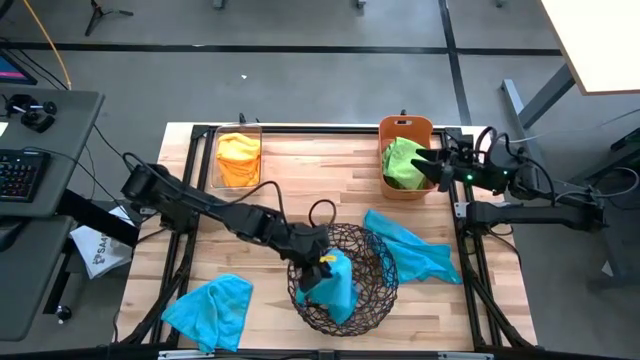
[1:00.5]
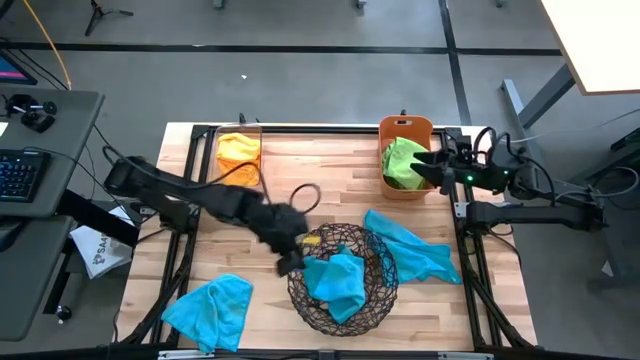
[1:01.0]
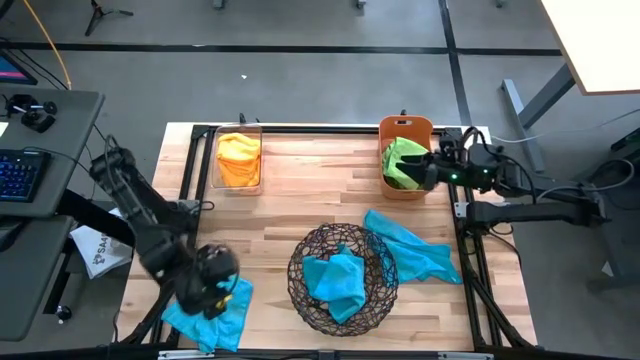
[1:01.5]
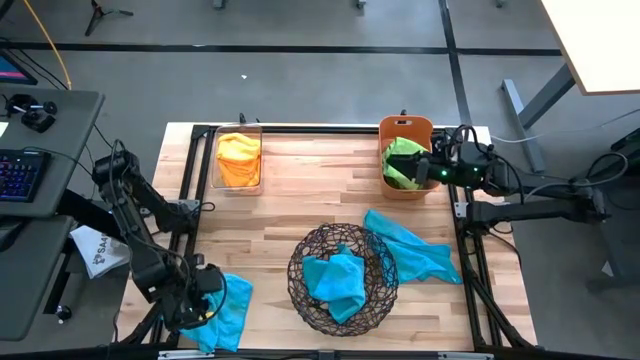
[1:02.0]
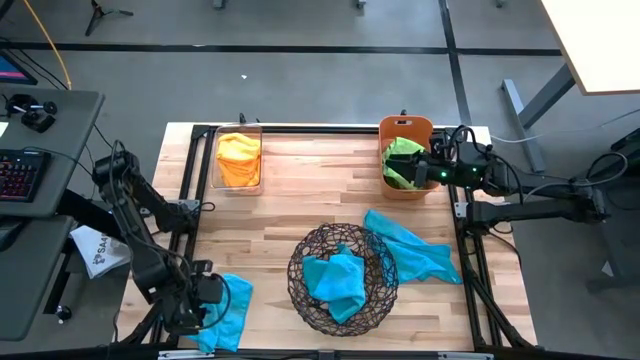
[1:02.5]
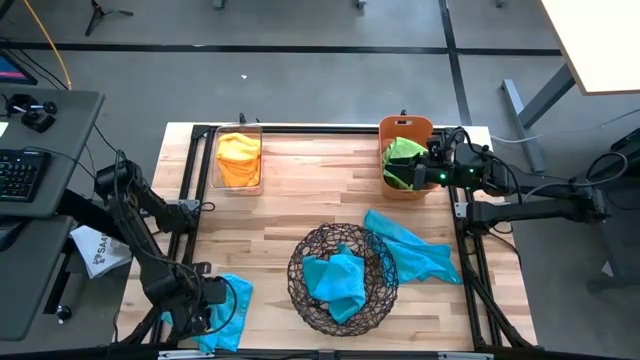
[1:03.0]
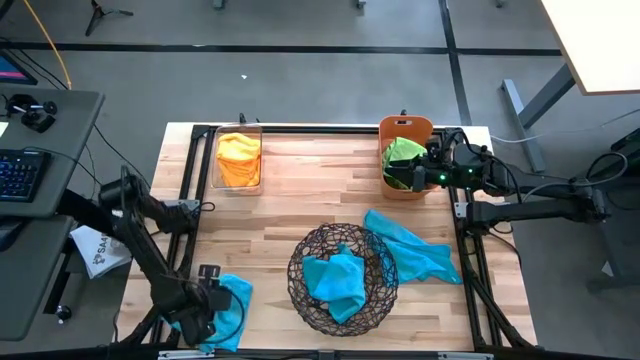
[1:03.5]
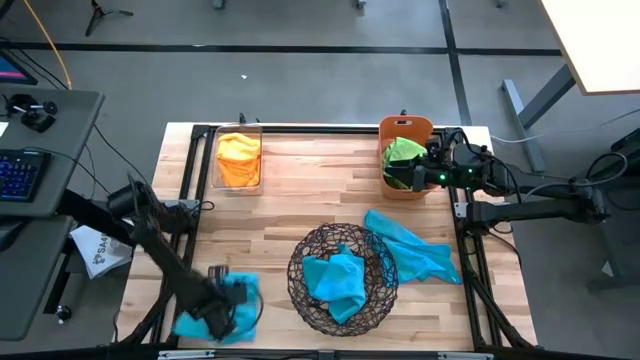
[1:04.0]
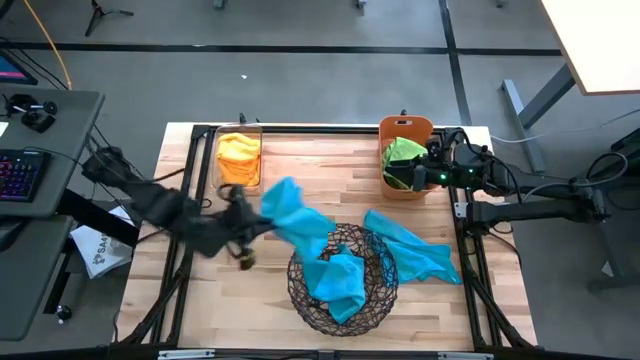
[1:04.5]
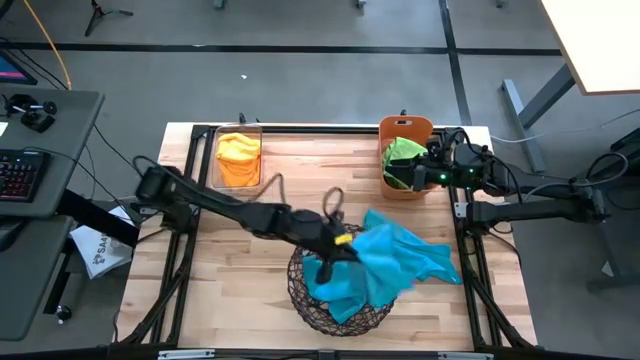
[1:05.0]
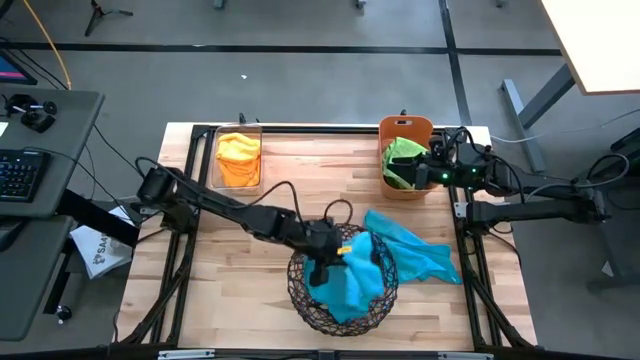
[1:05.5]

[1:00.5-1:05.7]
Task: Sort microfiber towel by color & place in baskets
Put the bottom blue towel into the black basket

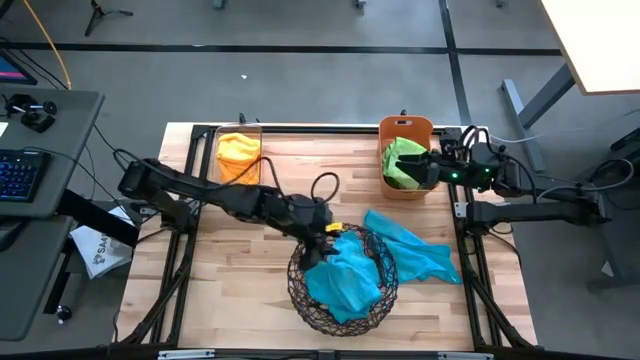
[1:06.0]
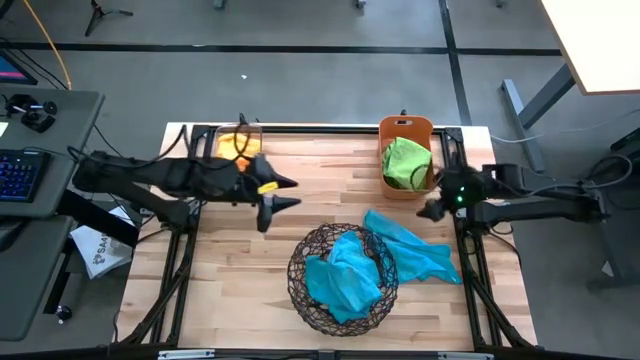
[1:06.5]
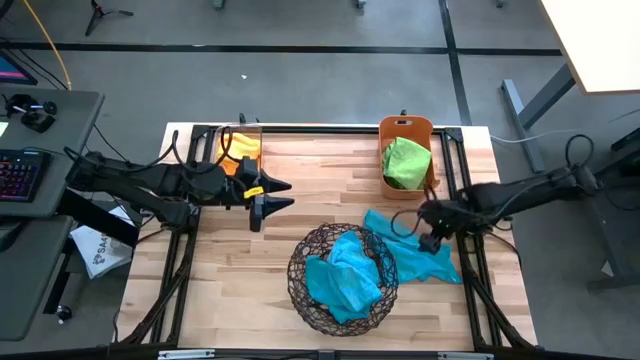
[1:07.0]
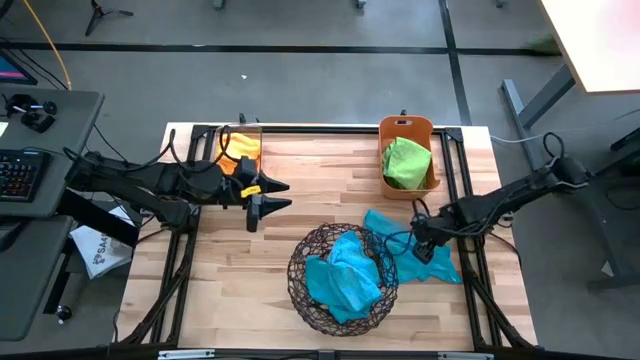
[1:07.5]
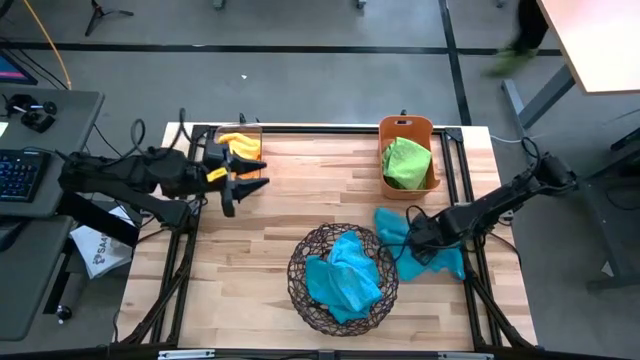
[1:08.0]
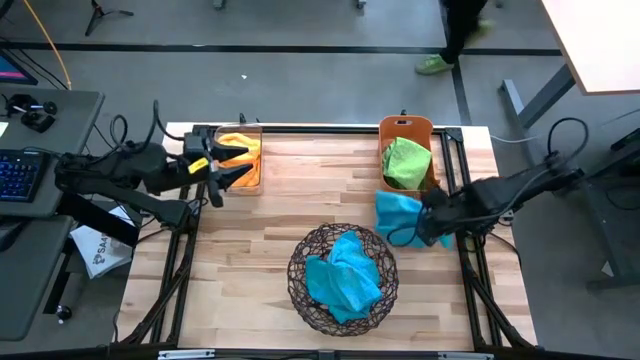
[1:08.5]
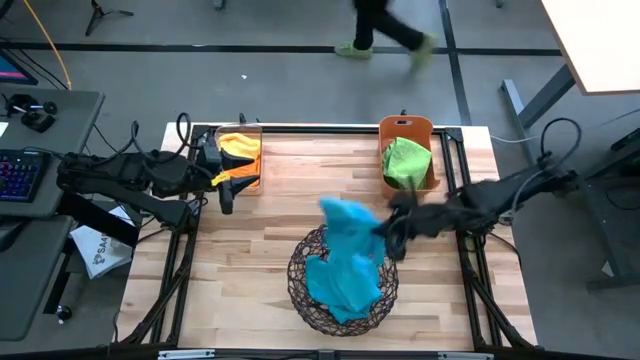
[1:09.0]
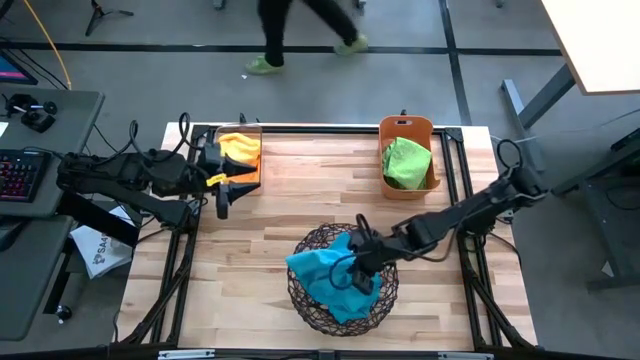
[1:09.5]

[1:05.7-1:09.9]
Put the blue towel into the black basket

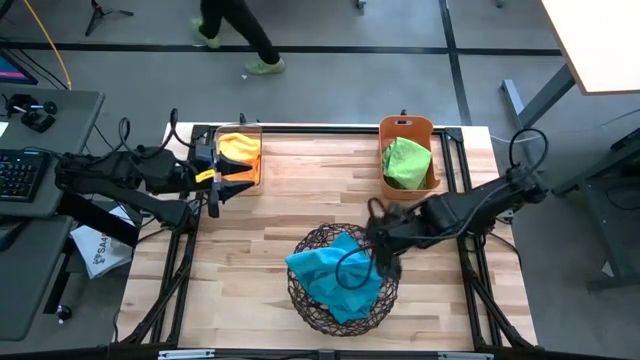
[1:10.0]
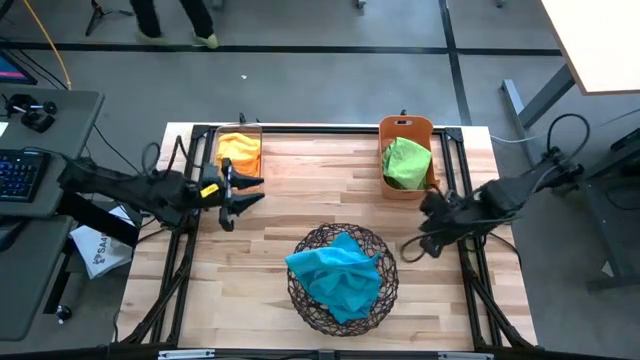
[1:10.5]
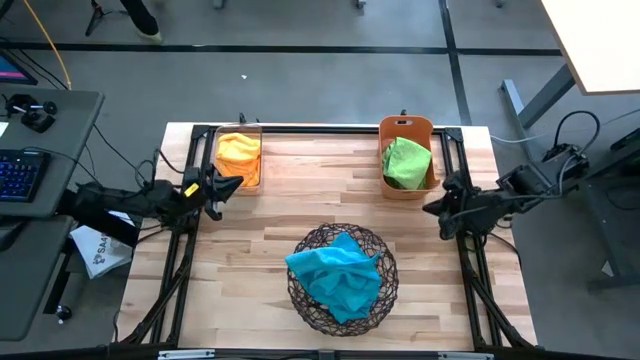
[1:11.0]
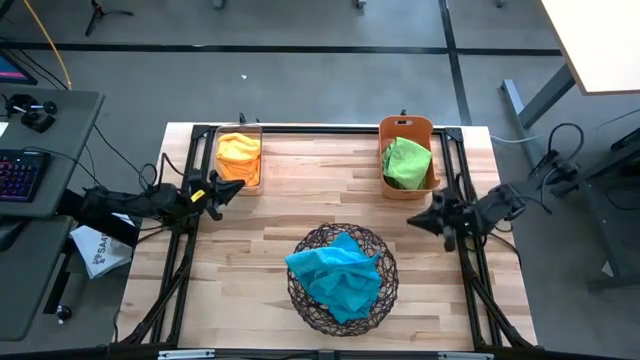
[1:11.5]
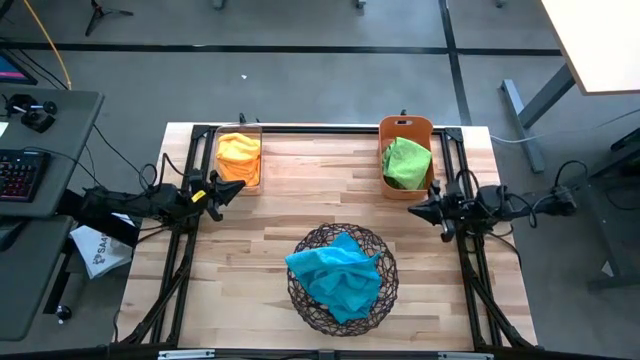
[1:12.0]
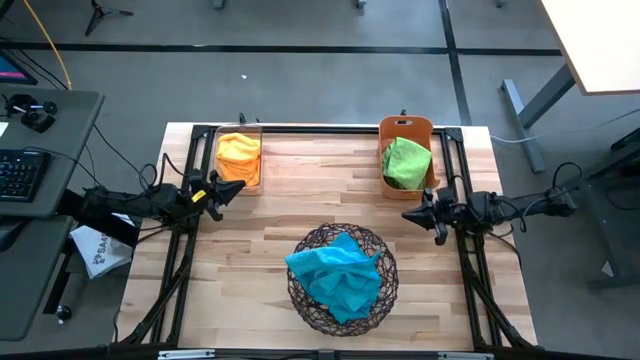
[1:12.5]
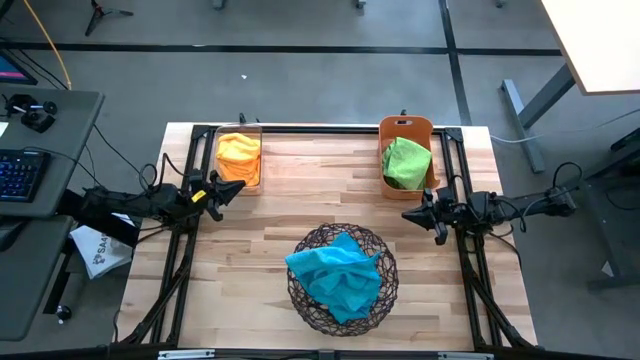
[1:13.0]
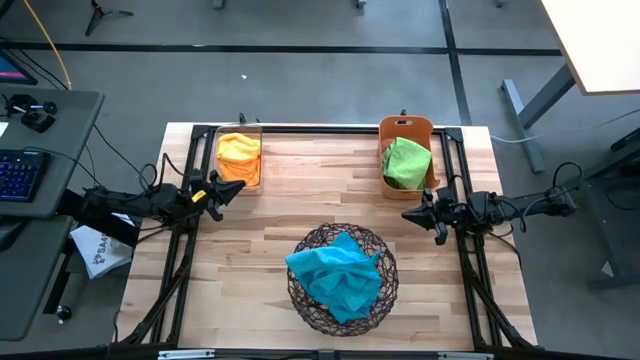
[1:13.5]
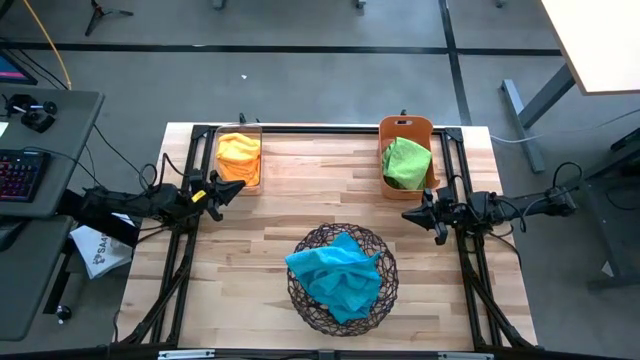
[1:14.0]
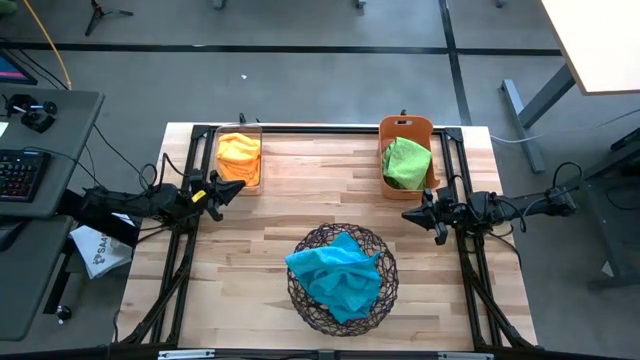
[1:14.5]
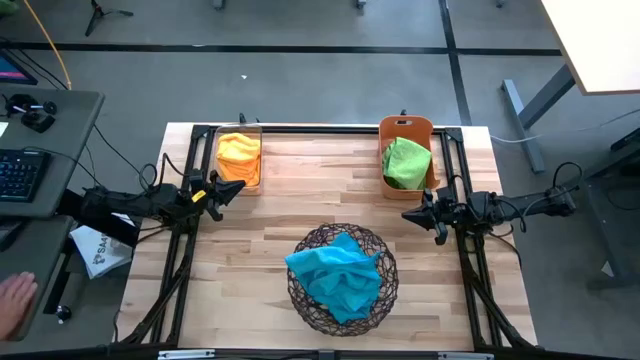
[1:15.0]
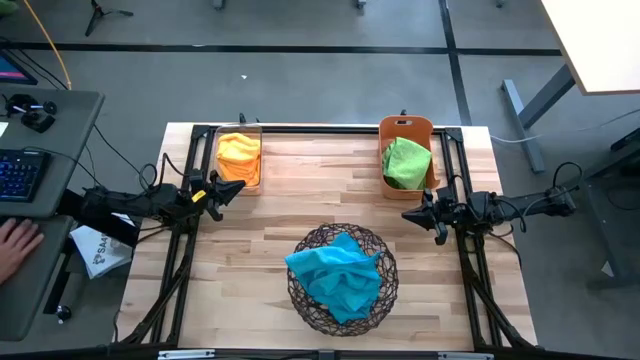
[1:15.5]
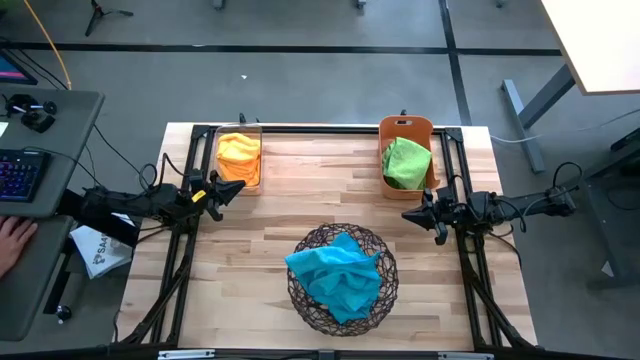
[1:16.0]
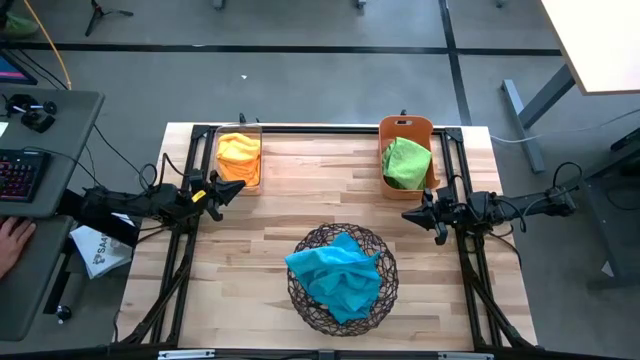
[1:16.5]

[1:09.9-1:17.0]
Return to Home Position

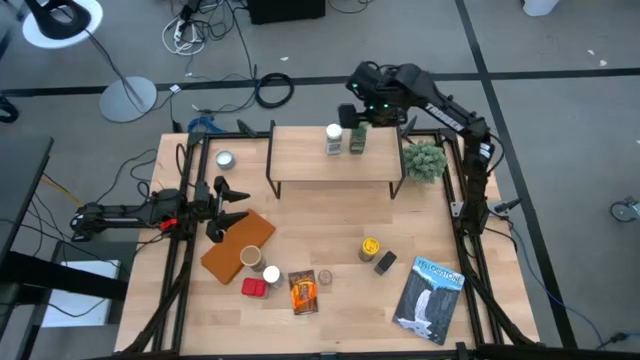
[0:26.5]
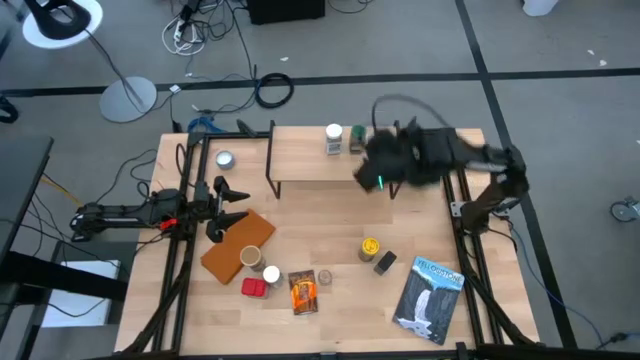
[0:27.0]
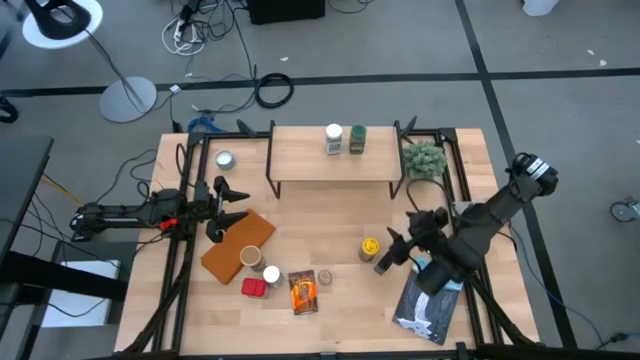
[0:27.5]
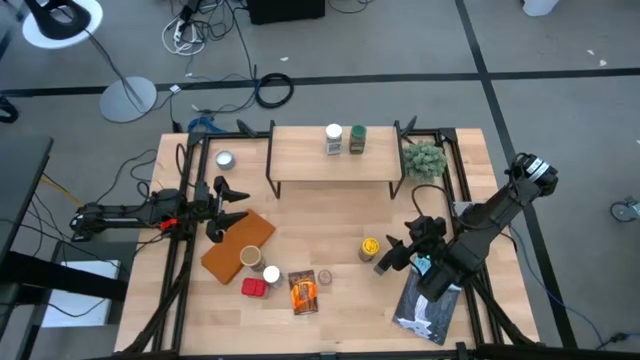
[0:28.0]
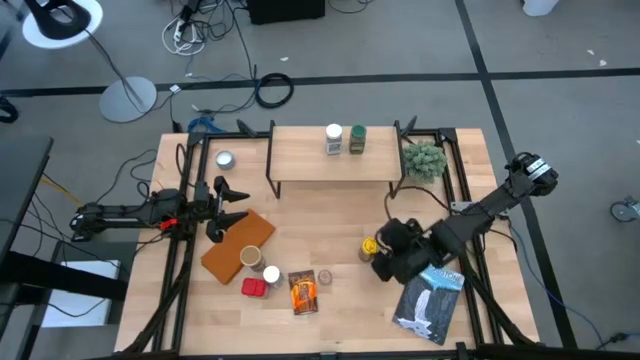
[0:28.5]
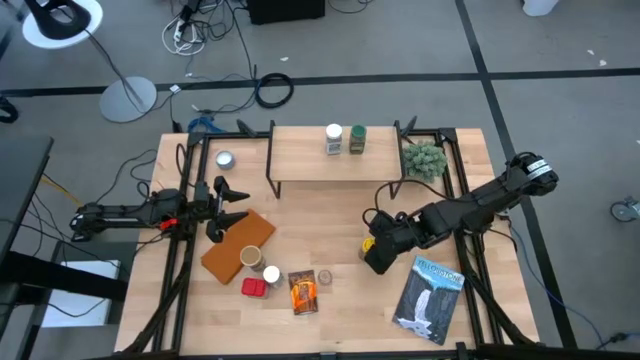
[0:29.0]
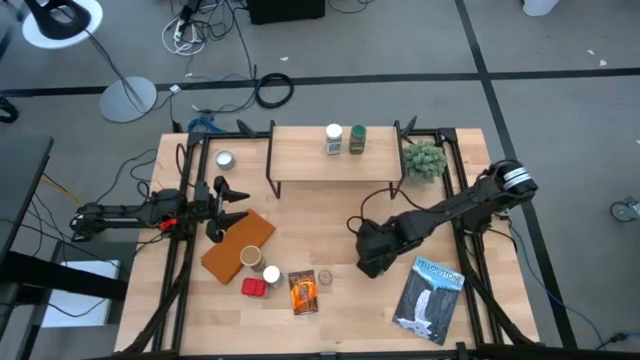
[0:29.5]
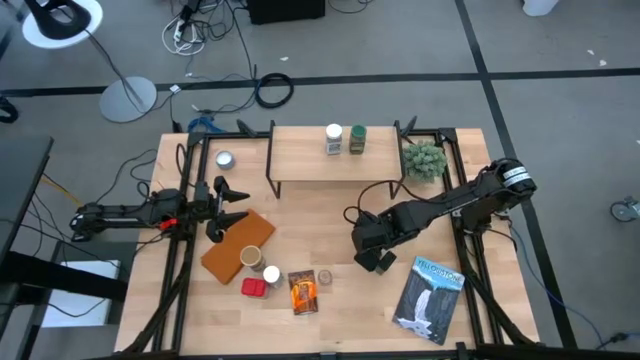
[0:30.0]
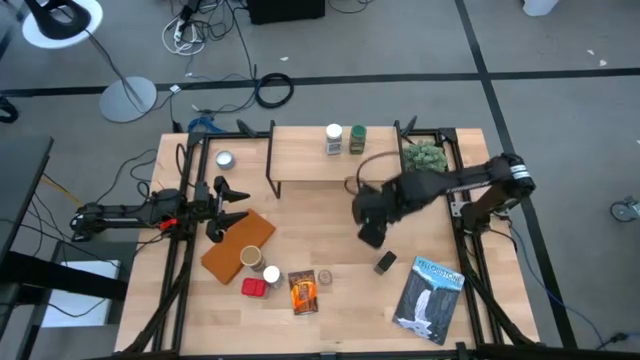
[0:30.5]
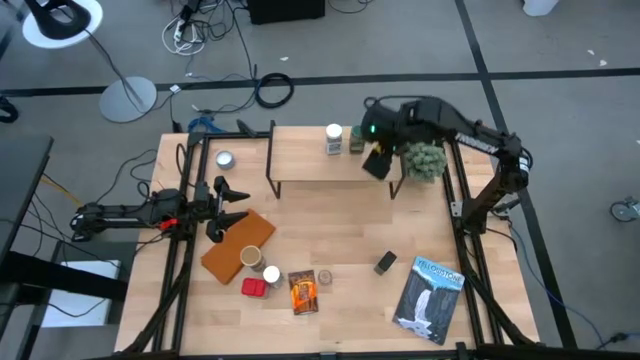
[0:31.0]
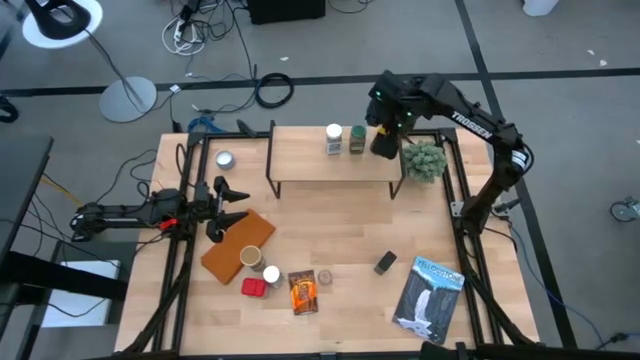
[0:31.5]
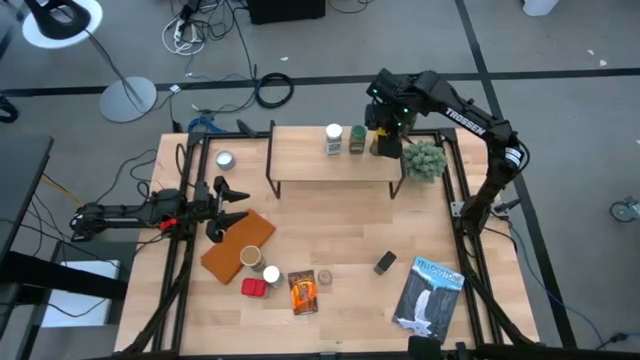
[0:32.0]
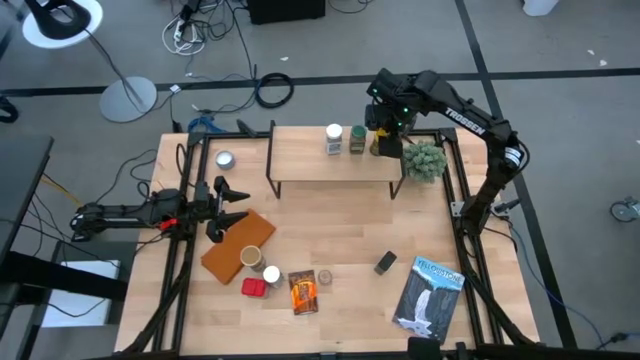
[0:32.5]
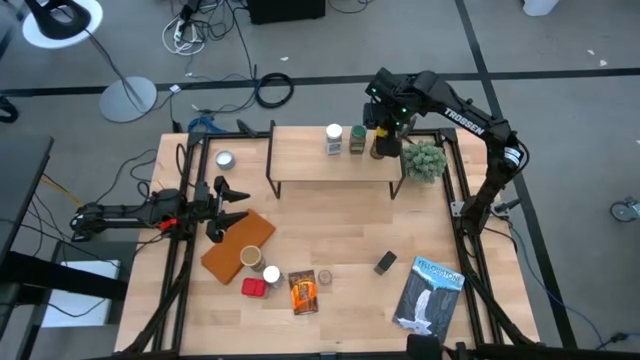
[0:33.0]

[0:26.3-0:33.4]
Task: Shelf spices
Put the yellow seasoning bottle on the shelf
